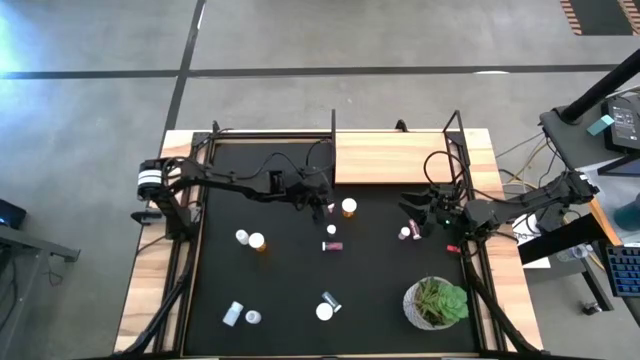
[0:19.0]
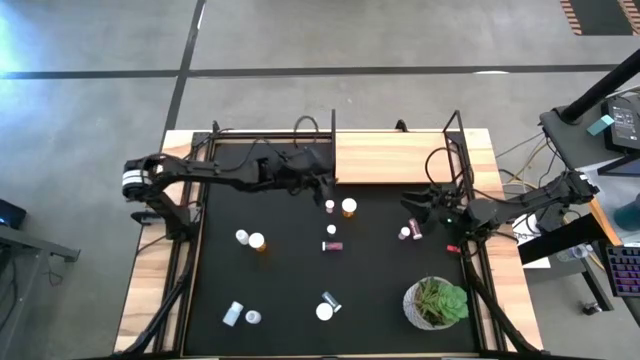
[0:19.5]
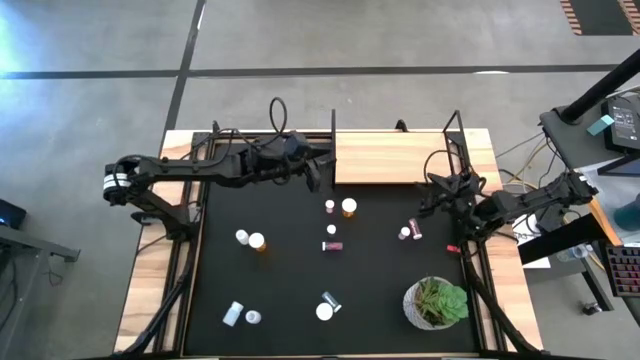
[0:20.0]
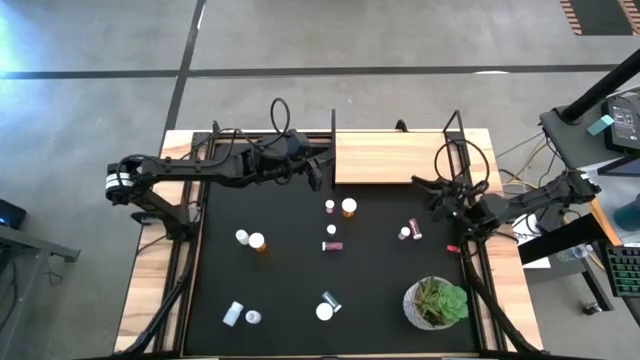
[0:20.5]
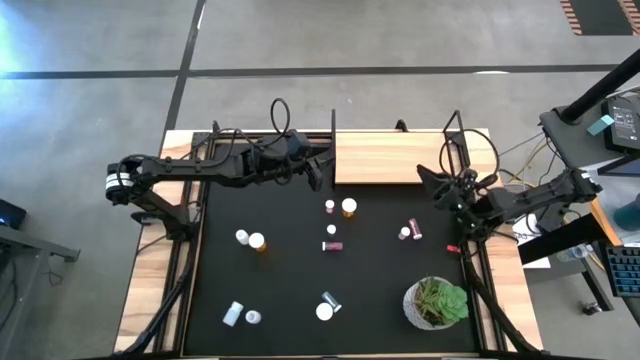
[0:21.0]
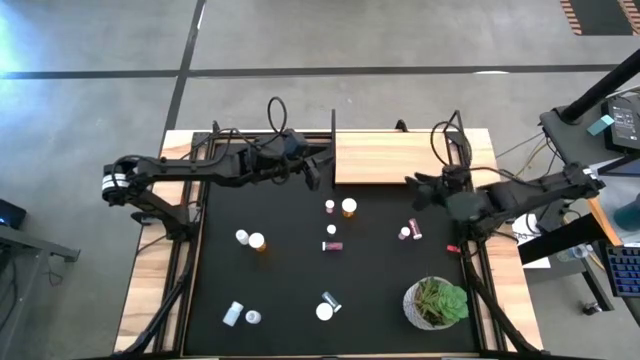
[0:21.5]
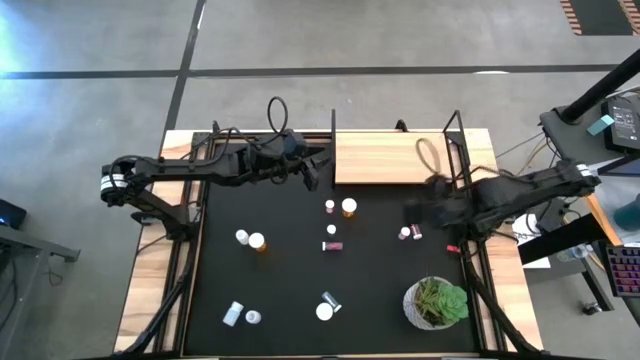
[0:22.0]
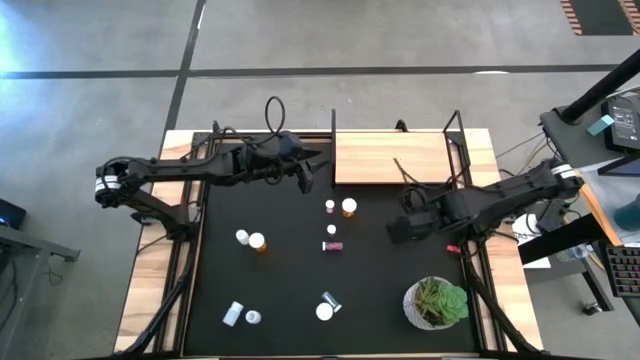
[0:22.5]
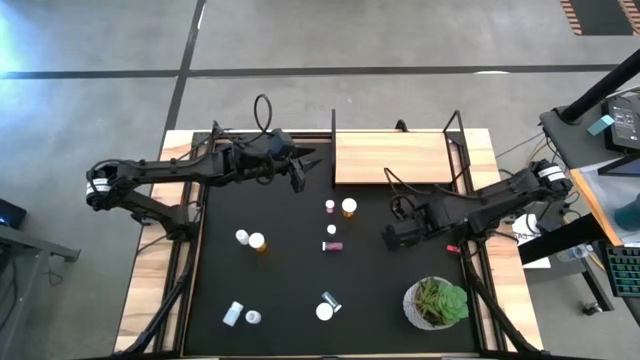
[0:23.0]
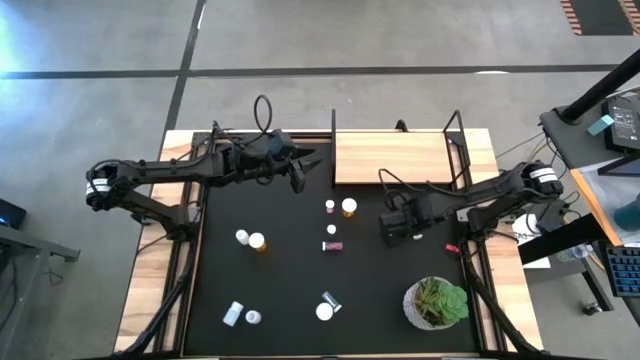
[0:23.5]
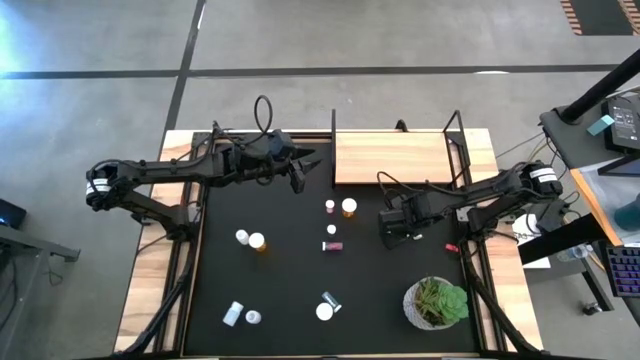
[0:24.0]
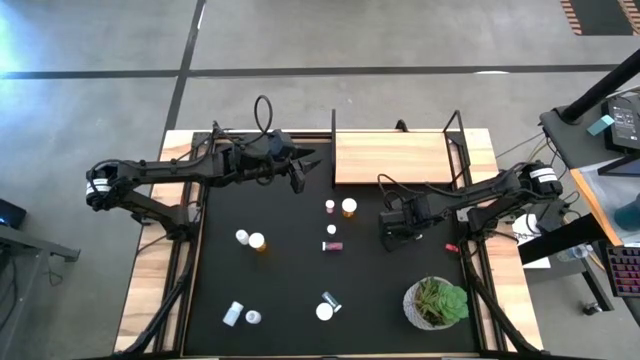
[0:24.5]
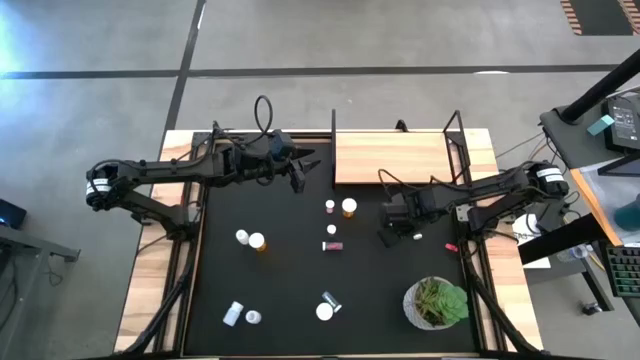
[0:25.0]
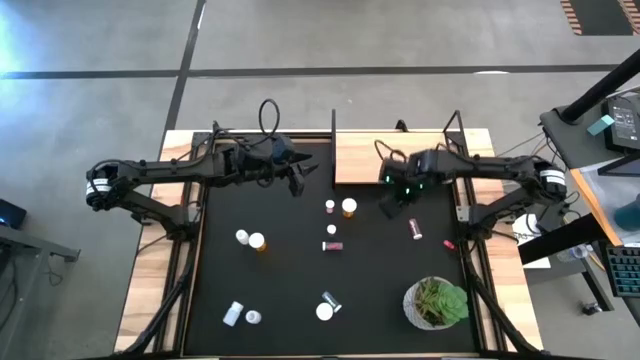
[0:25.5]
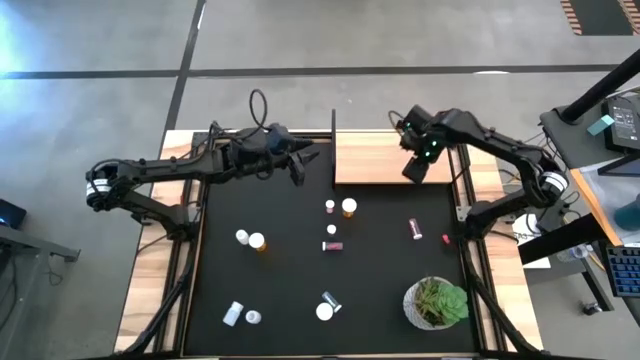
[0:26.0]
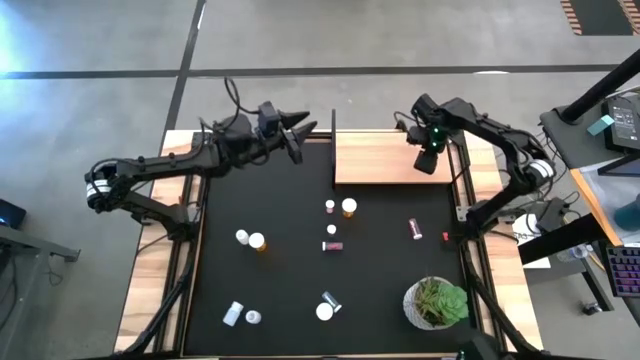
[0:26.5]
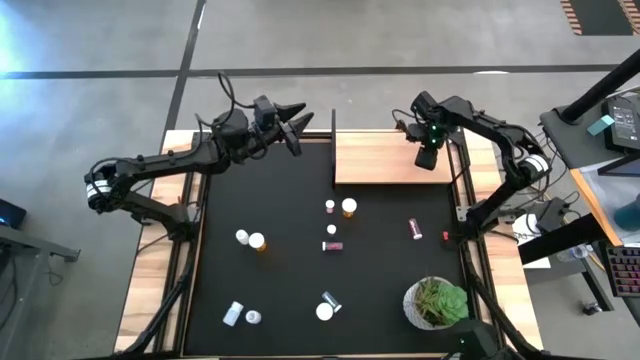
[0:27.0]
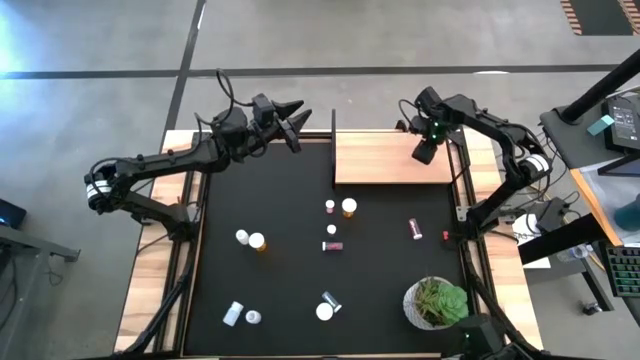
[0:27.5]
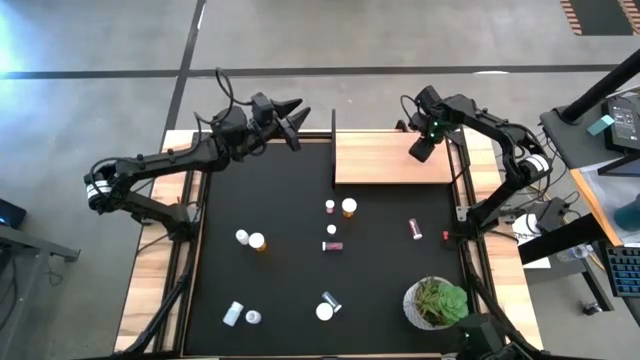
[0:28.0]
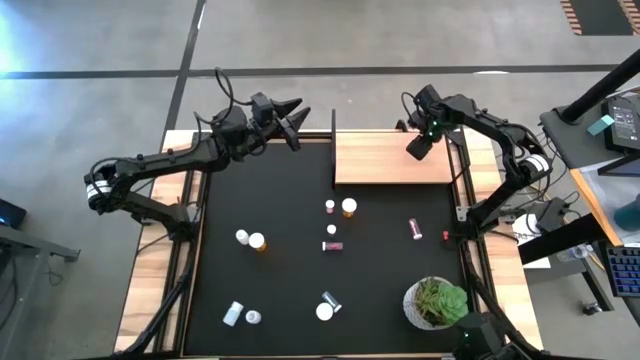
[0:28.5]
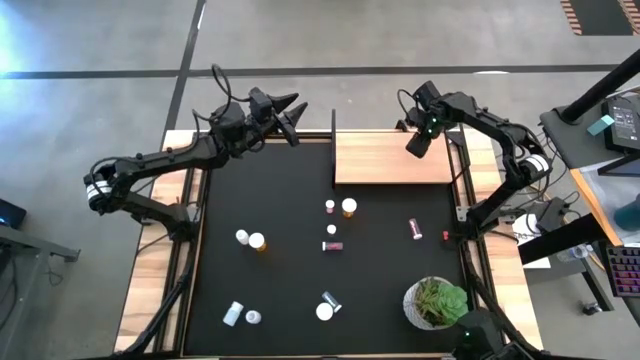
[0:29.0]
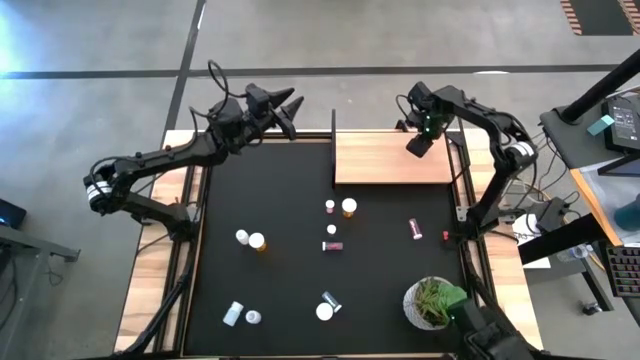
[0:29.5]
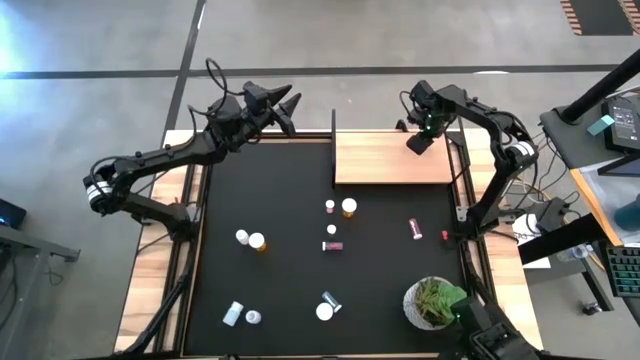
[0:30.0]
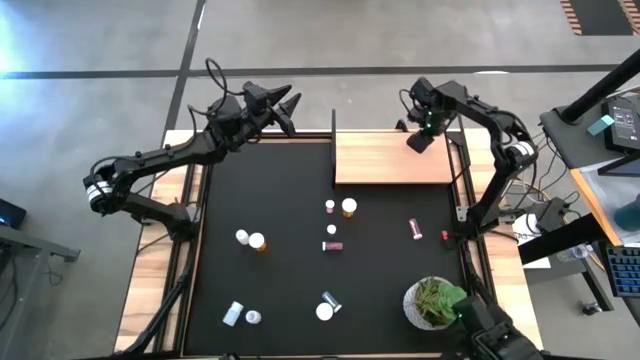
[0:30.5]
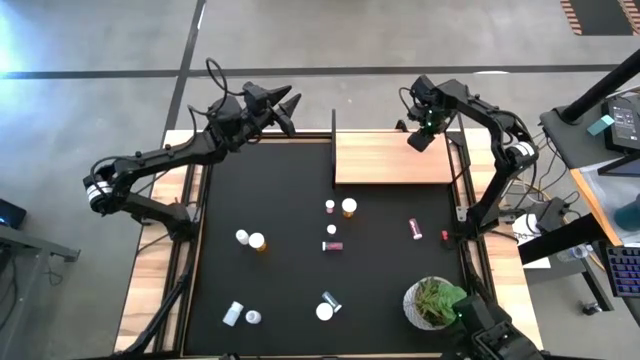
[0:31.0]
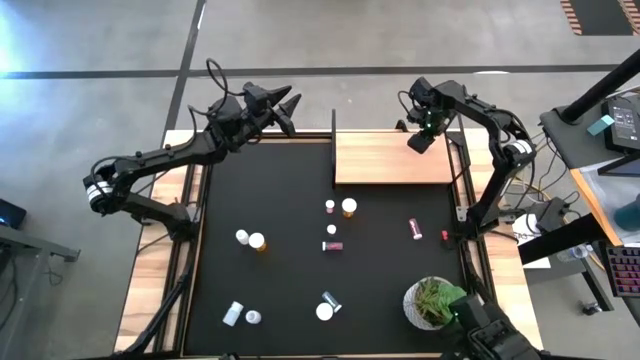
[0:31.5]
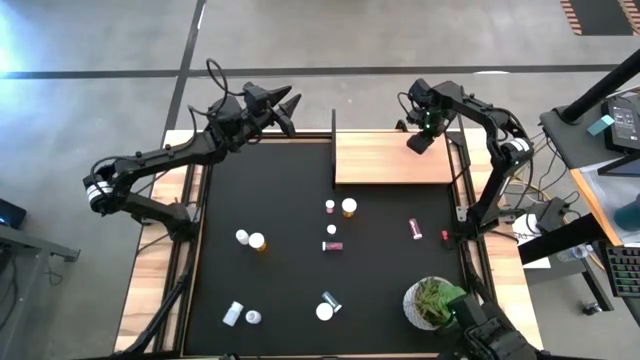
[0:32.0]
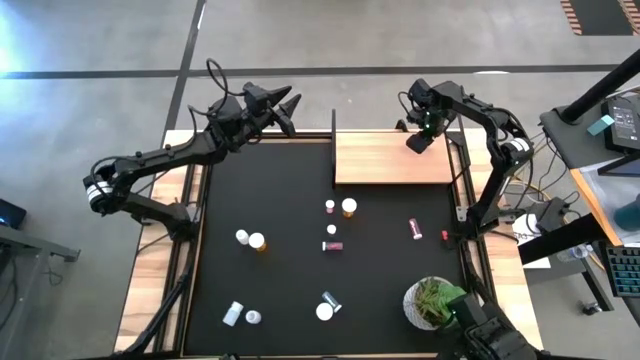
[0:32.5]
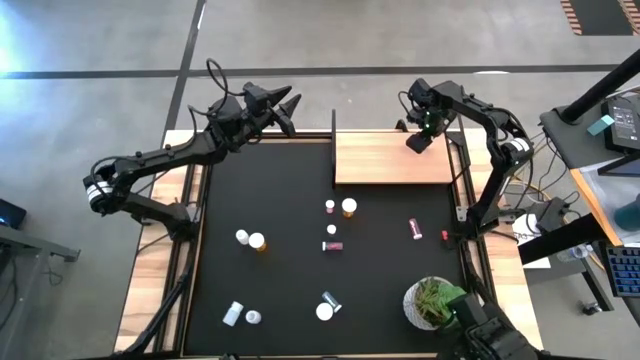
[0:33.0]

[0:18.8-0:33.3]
Task: Pick and place medicine bottles onto shelf by color
Put the middle pink pill bottle on the shelf

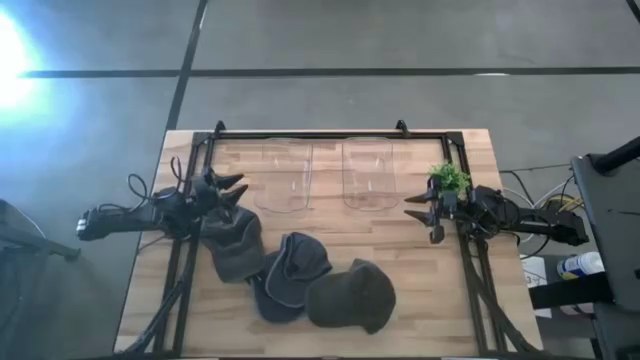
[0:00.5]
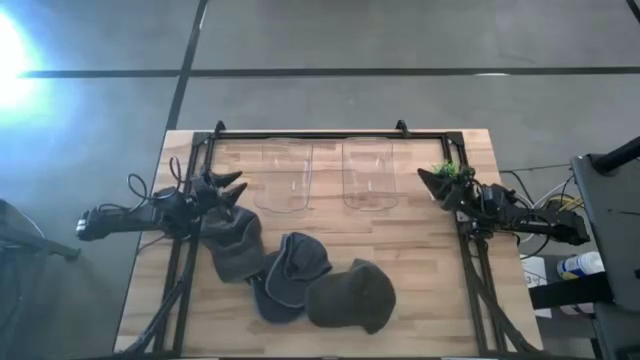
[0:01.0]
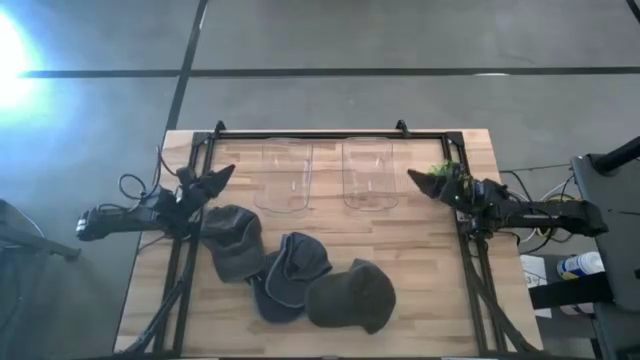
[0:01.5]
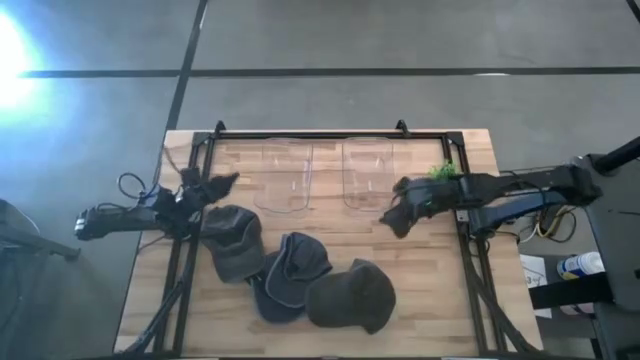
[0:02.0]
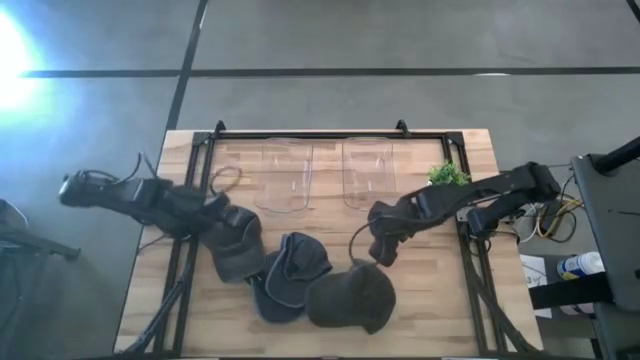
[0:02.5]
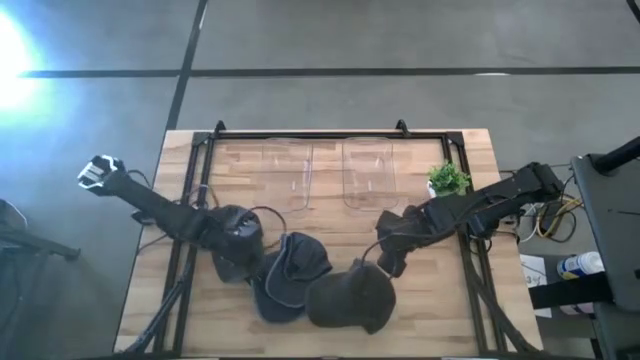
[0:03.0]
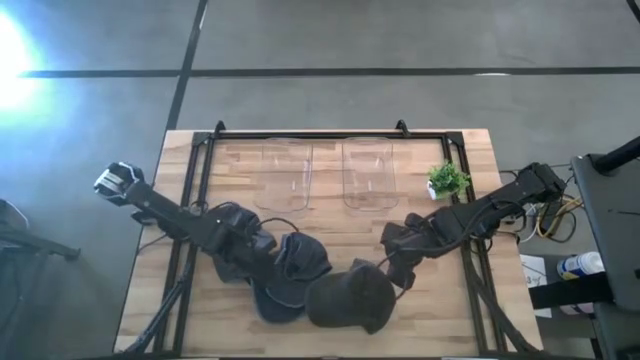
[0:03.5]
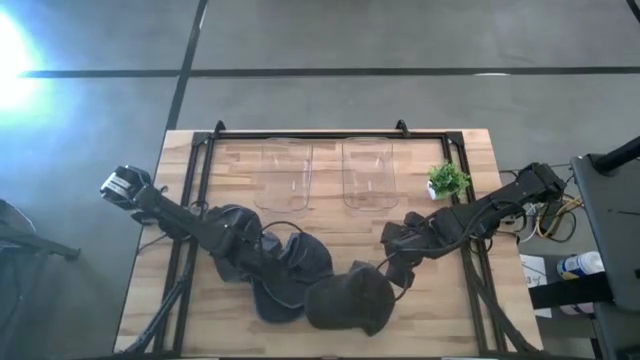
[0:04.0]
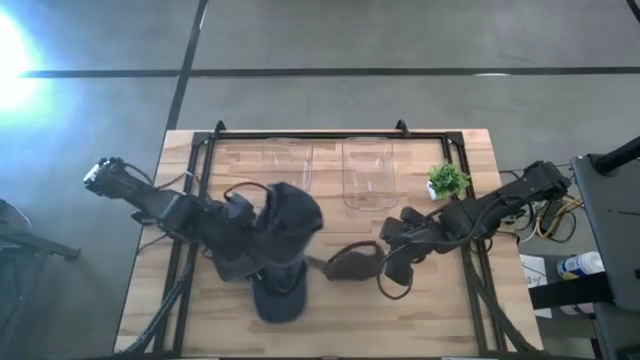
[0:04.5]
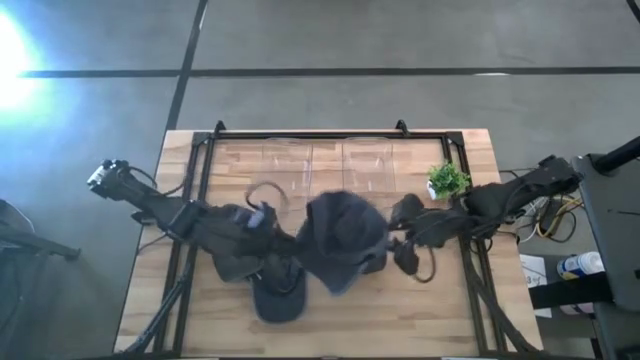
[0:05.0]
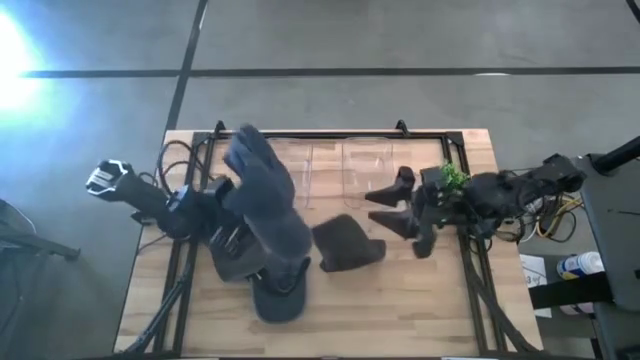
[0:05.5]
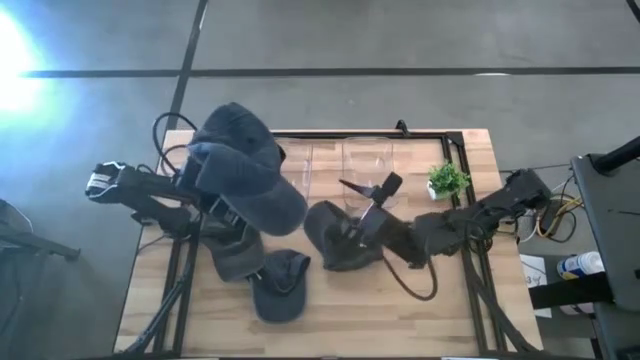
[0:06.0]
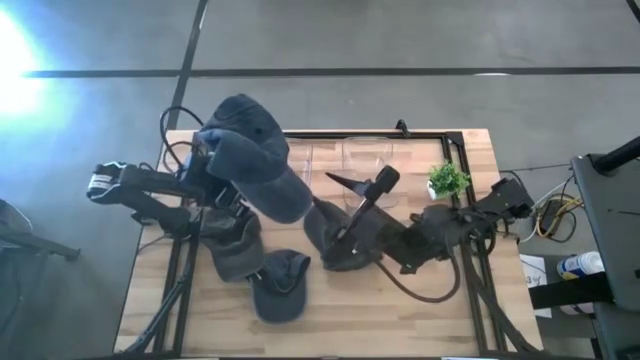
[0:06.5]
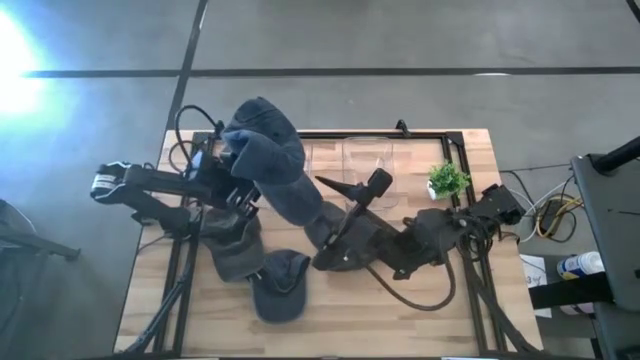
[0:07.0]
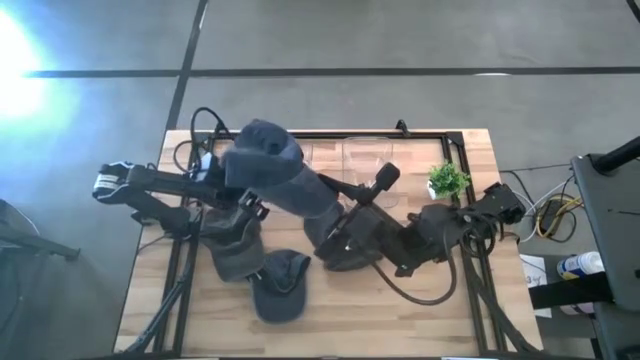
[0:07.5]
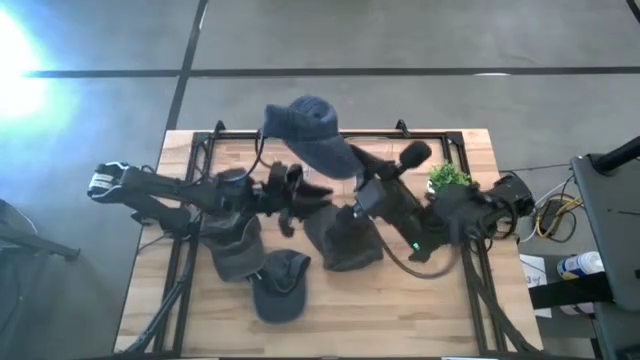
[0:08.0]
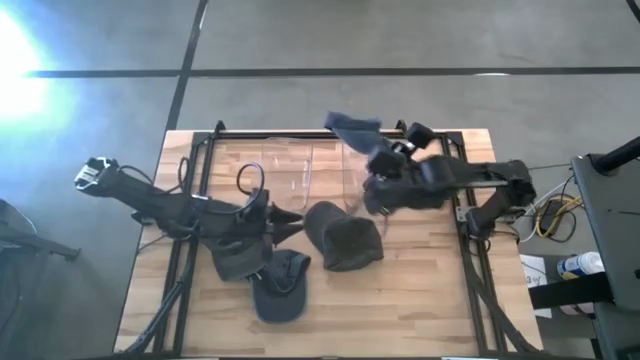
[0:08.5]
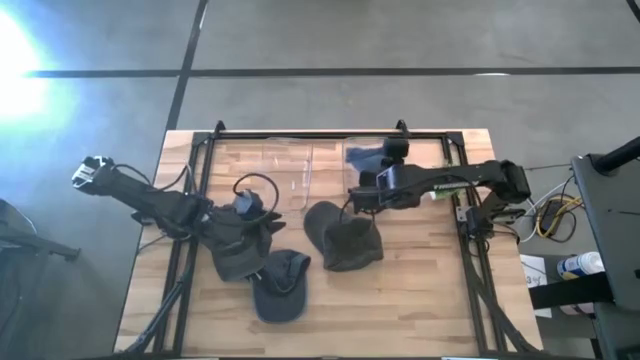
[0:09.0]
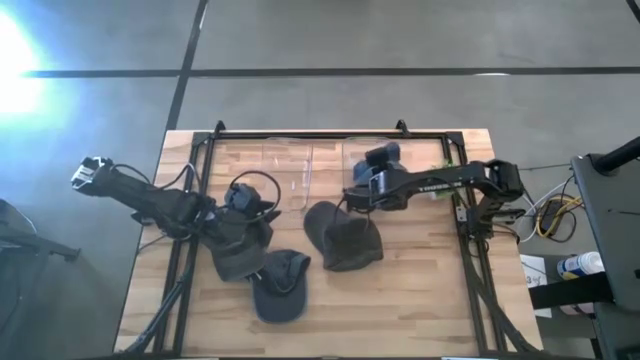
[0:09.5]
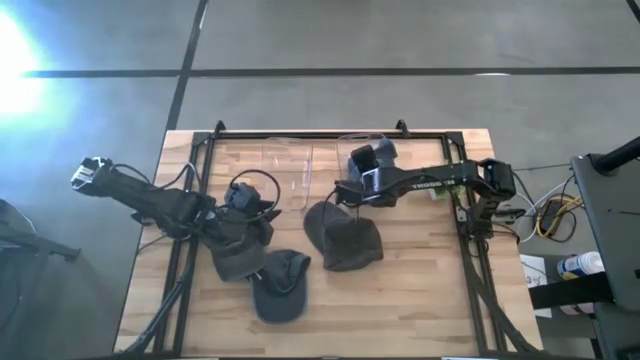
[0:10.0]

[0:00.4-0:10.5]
Task: Pick & Place hat
Put the top blue cap into the right transparent bin
